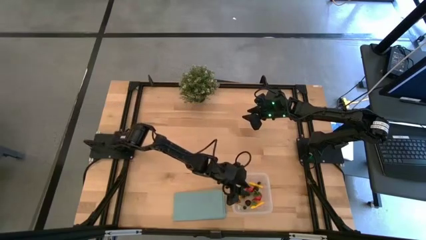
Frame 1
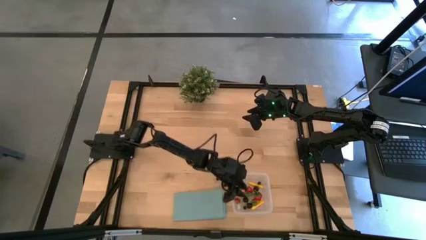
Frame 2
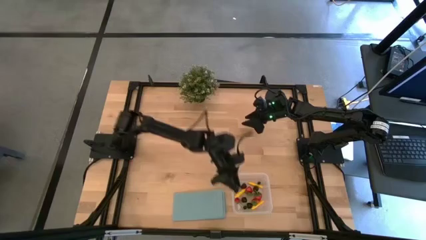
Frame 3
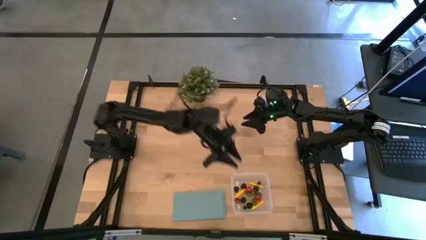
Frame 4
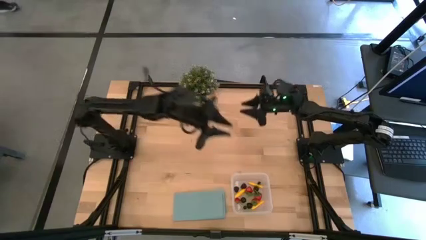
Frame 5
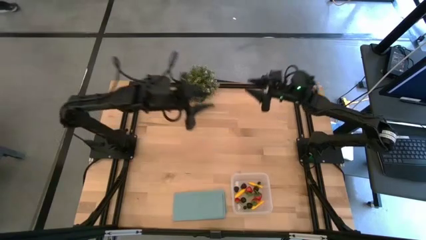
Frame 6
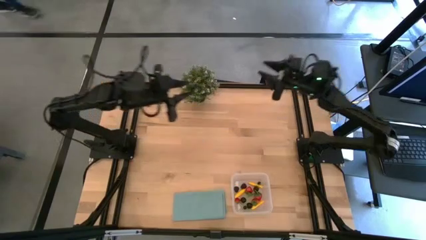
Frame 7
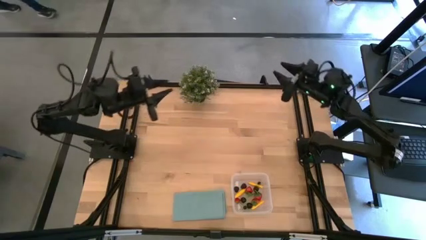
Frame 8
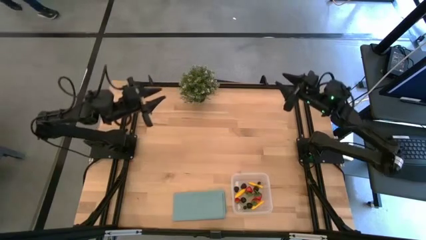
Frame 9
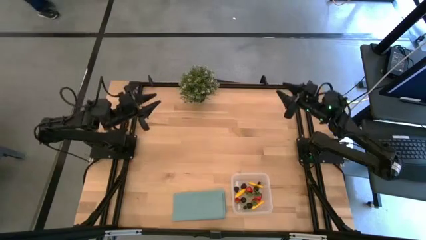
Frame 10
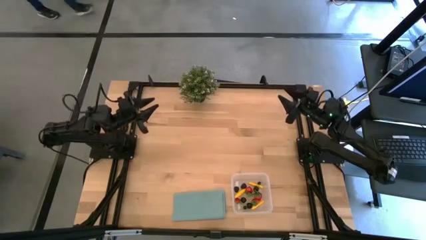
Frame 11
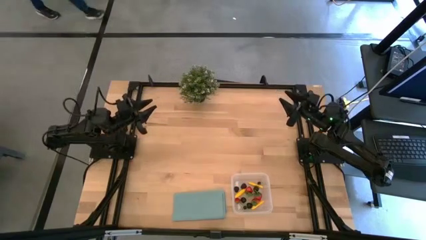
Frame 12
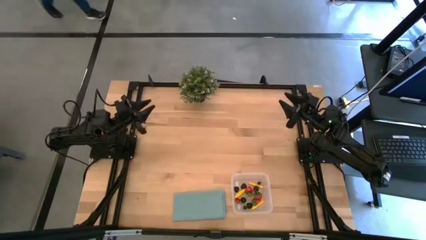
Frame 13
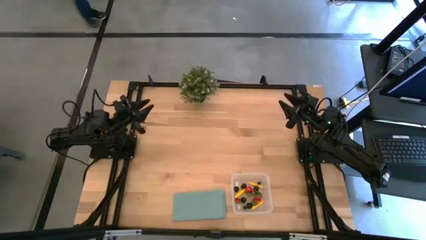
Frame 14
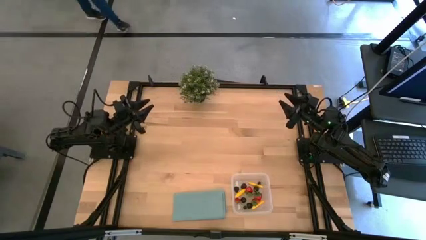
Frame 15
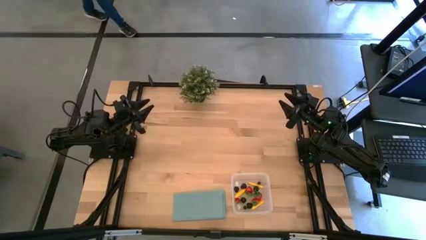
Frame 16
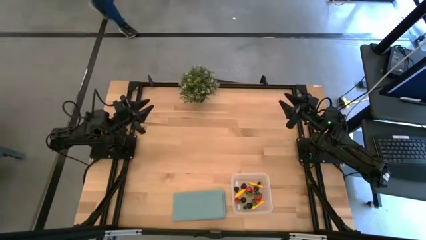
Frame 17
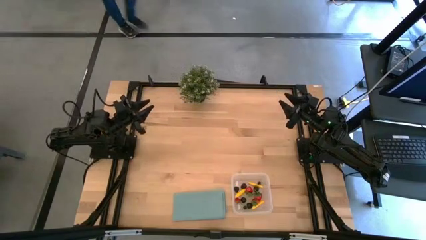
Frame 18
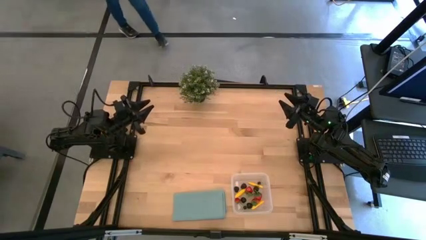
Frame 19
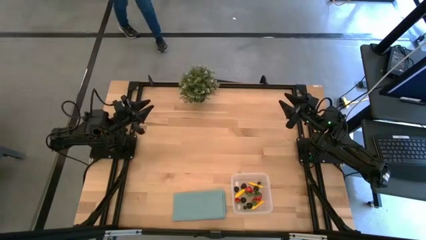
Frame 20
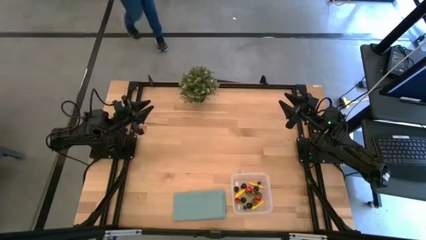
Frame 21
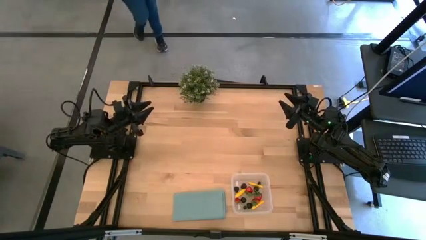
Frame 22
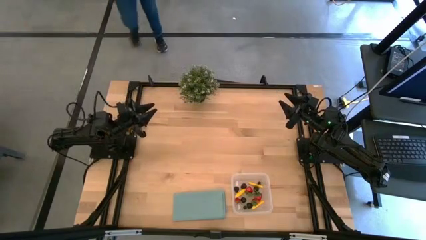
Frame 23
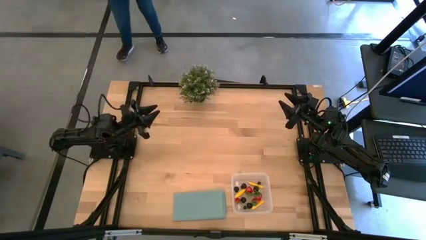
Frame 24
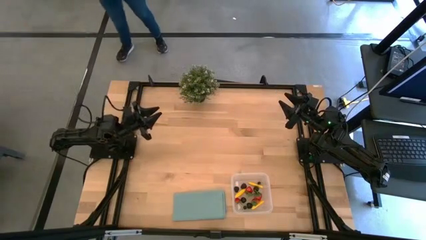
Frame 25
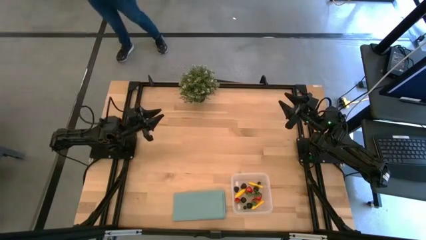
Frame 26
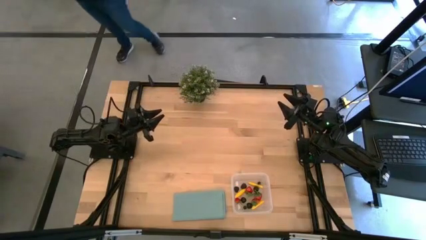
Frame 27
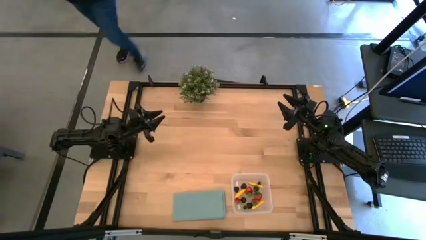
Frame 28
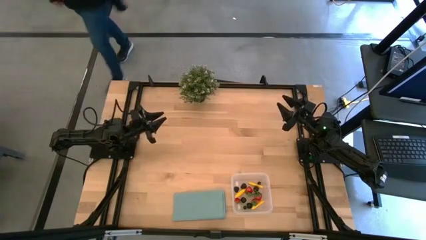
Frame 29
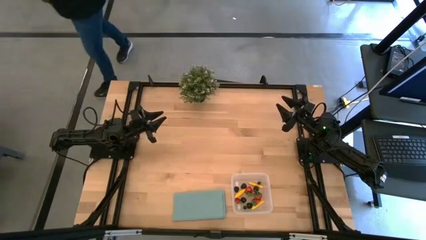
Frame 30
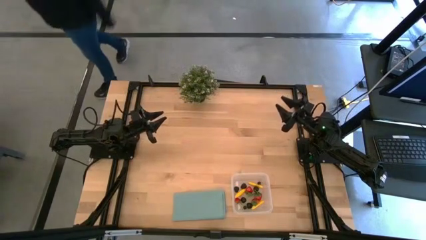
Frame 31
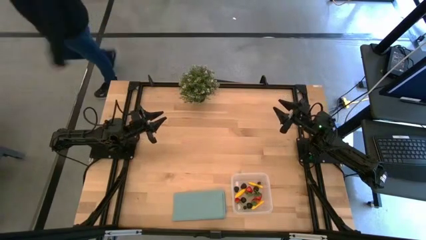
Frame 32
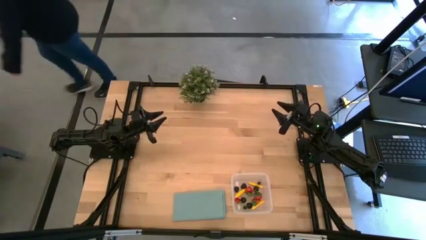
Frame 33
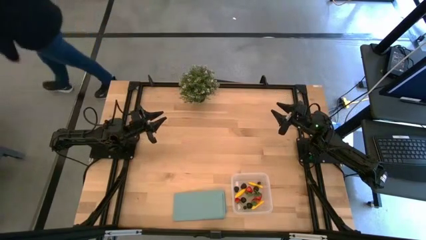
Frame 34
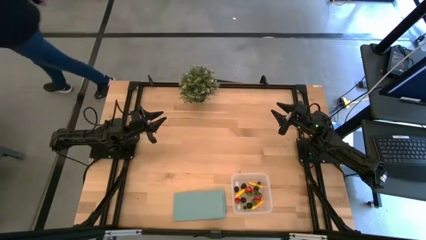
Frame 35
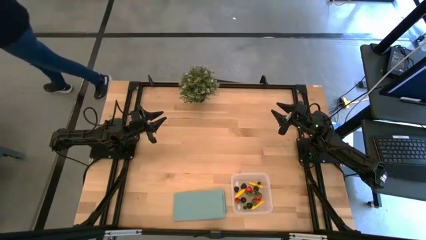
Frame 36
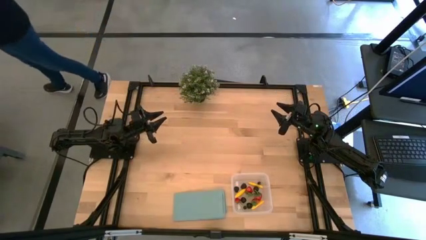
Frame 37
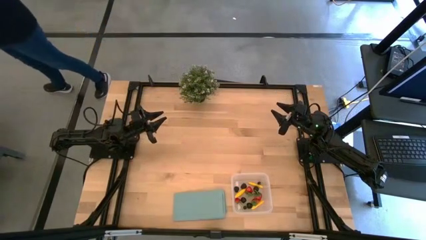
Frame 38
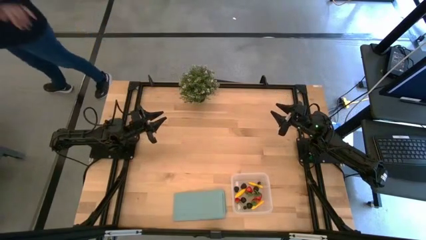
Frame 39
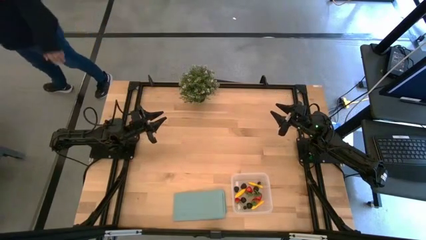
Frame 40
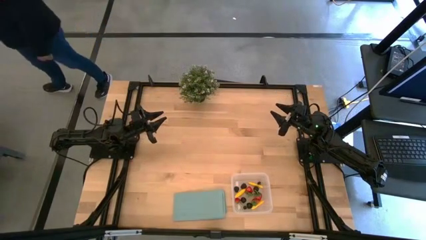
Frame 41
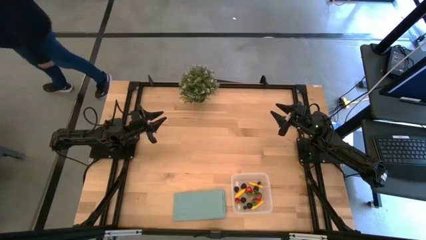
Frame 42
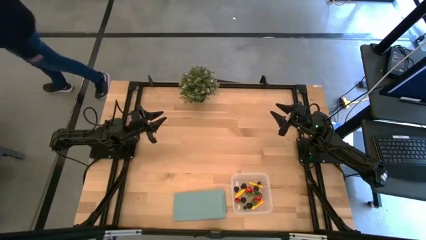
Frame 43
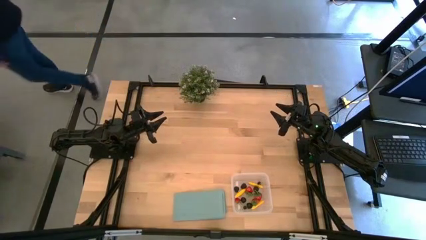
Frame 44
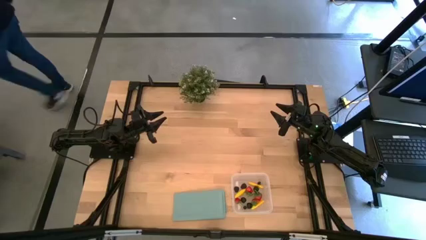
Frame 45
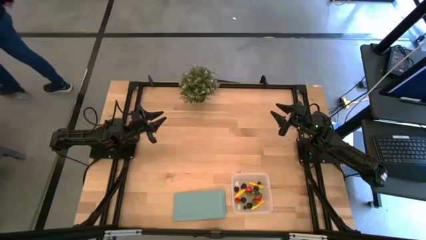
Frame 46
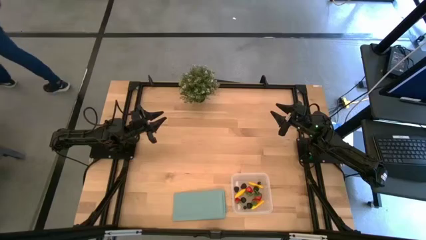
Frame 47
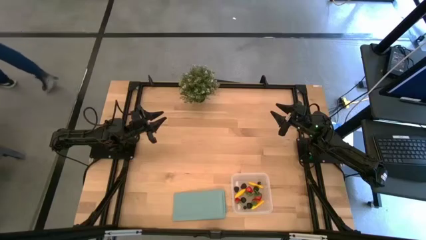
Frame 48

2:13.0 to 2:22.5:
Task: Pick and placing Produce into tupperware
Return to Home Position

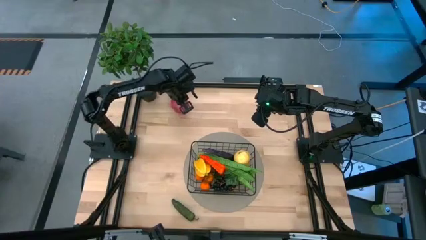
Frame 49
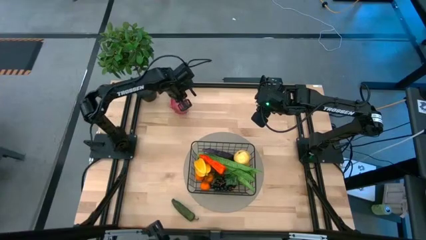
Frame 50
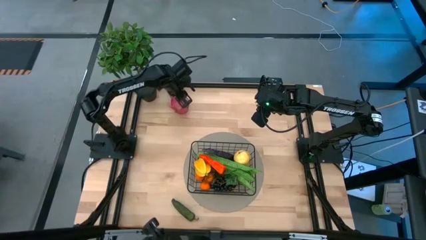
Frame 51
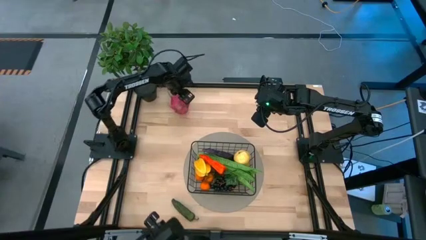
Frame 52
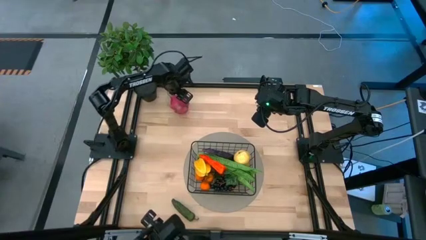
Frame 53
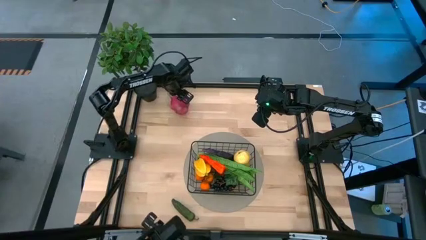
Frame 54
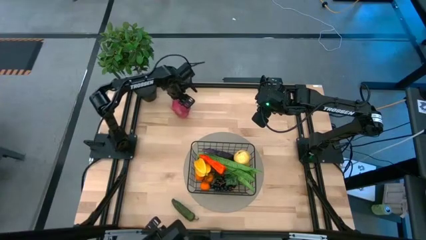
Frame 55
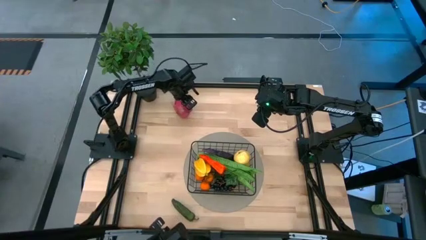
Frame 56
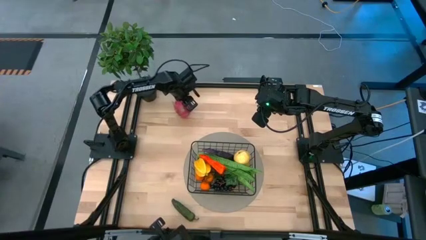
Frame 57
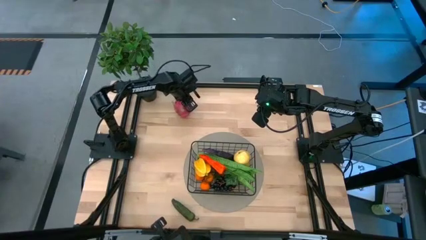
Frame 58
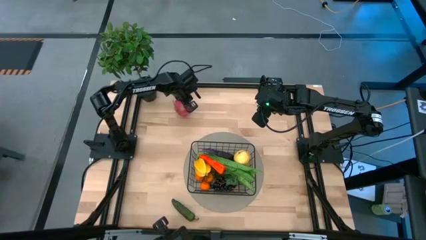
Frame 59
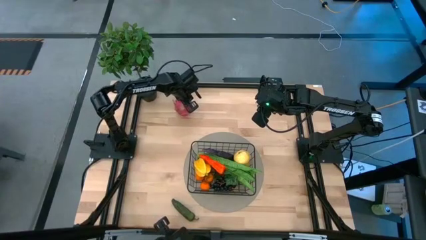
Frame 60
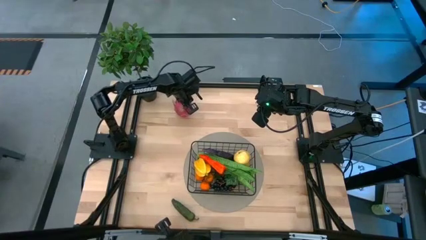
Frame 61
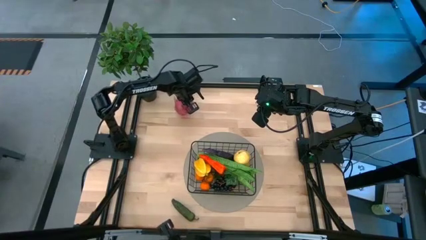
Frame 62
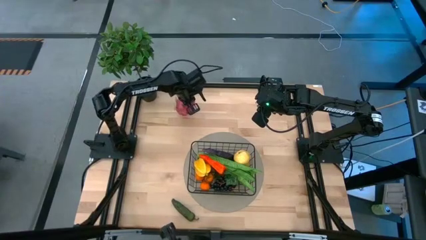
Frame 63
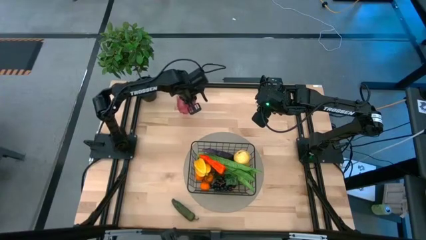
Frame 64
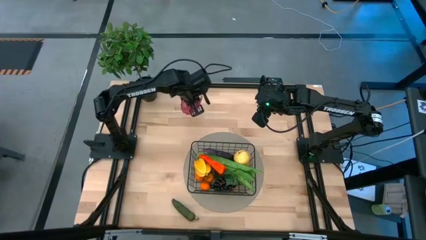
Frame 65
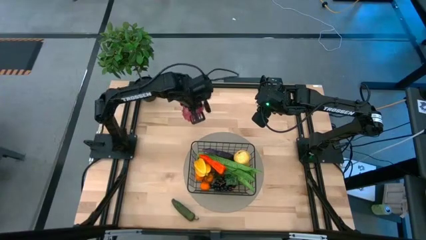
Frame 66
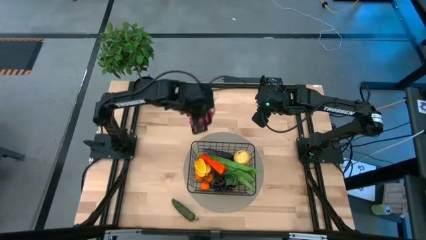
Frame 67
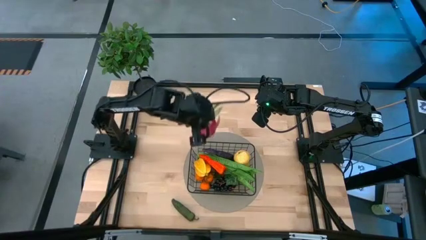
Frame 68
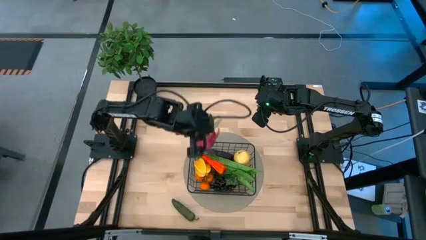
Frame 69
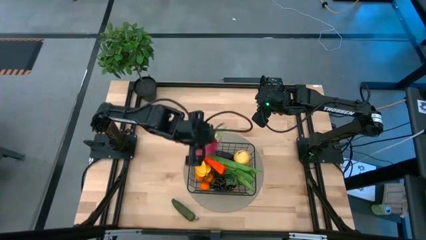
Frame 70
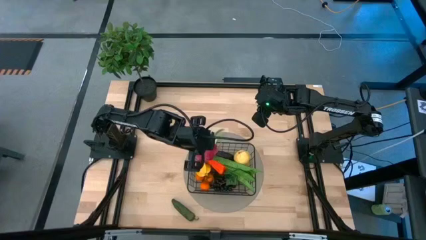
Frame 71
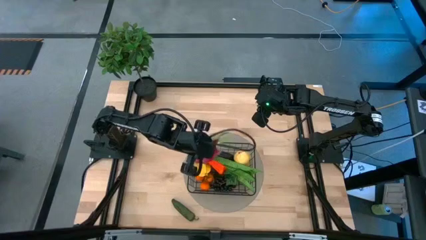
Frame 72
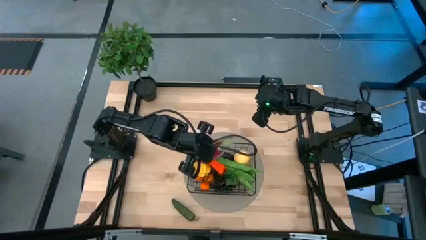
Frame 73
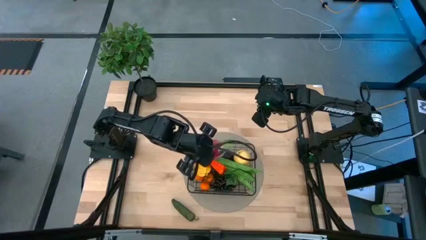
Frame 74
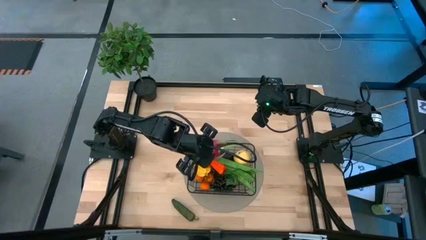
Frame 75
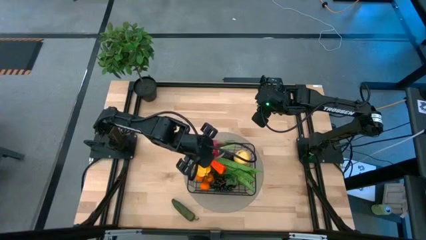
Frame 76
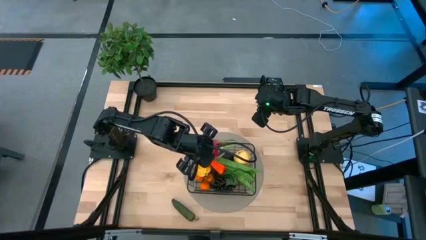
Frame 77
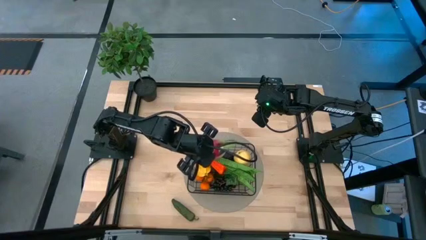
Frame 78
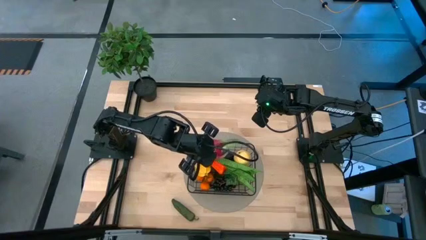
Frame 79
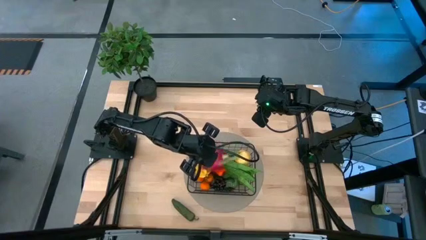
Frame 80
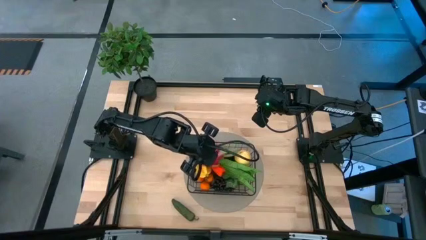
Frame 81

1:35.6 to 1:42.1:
Task: Build produce basket
Put the dragonfruit into the black basket
